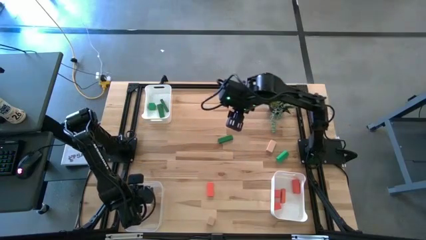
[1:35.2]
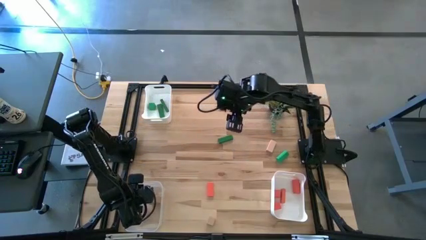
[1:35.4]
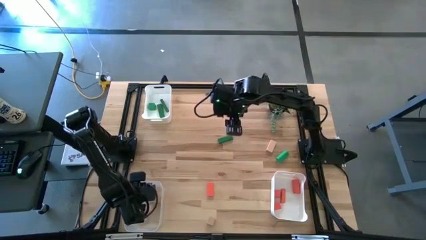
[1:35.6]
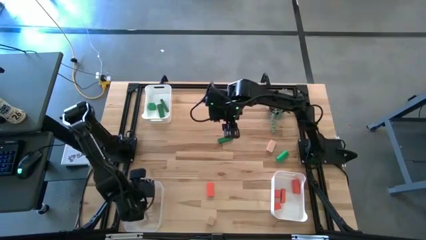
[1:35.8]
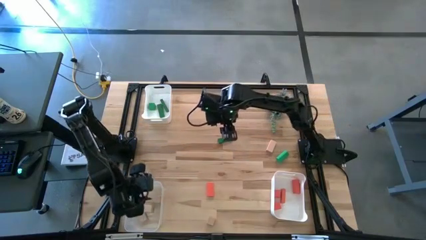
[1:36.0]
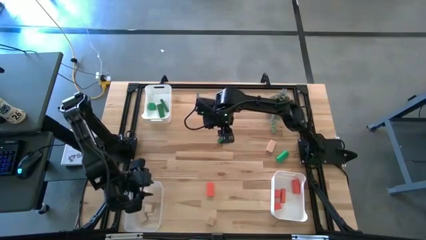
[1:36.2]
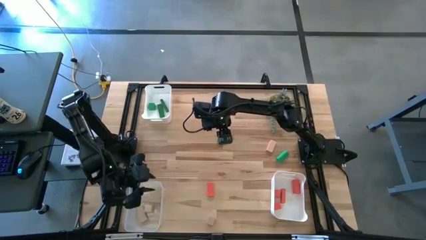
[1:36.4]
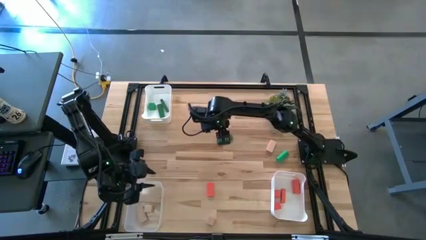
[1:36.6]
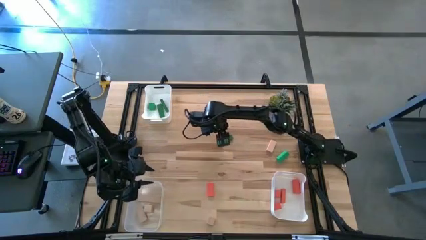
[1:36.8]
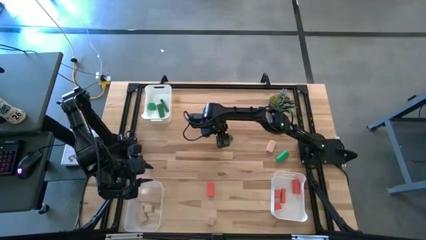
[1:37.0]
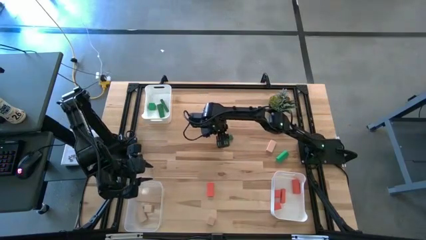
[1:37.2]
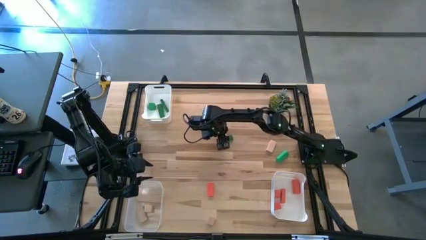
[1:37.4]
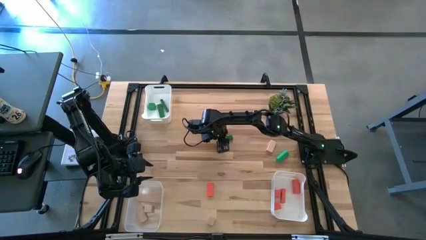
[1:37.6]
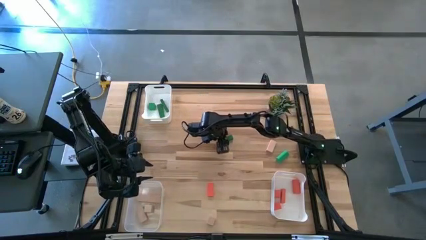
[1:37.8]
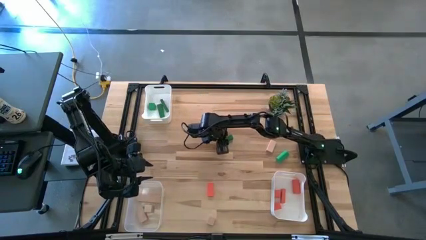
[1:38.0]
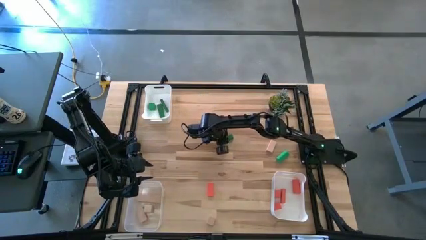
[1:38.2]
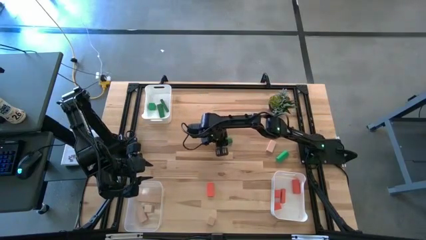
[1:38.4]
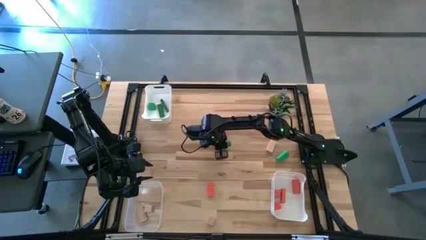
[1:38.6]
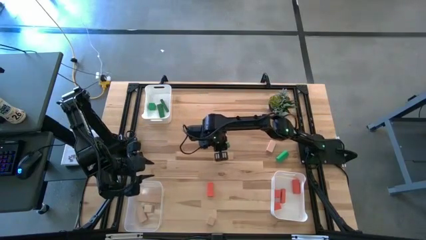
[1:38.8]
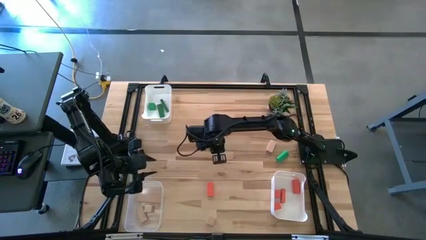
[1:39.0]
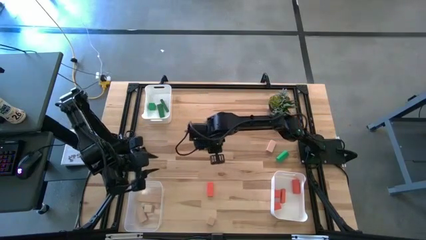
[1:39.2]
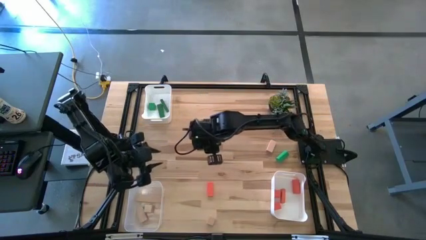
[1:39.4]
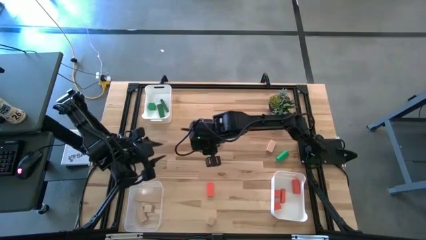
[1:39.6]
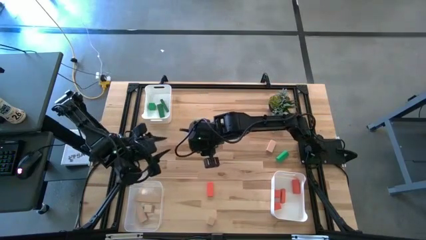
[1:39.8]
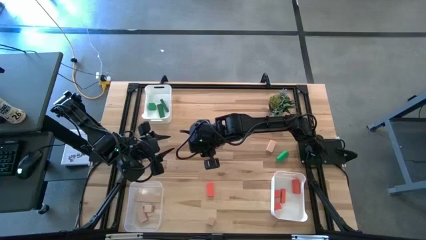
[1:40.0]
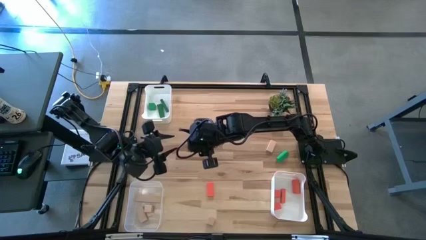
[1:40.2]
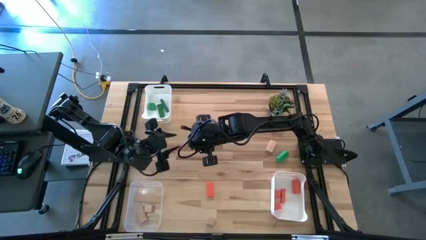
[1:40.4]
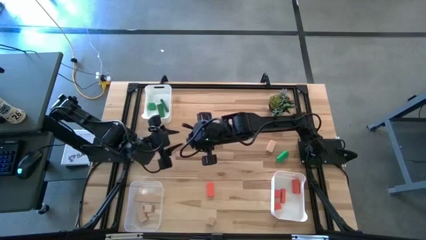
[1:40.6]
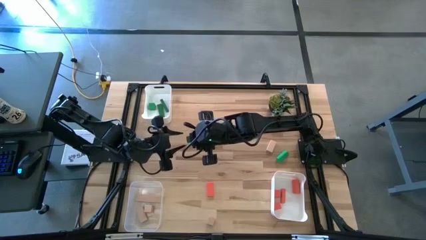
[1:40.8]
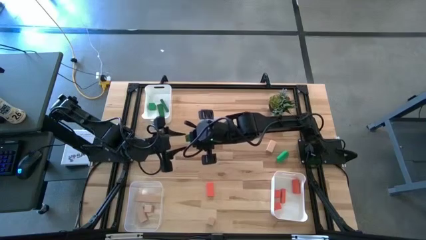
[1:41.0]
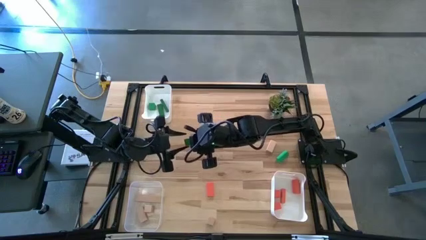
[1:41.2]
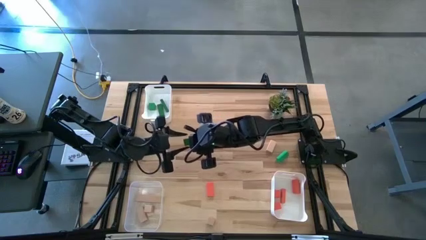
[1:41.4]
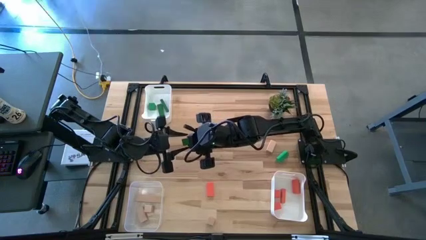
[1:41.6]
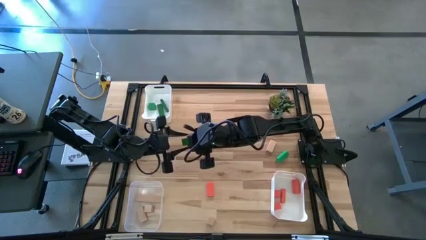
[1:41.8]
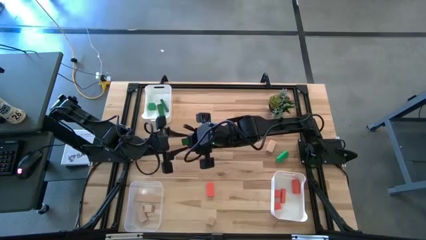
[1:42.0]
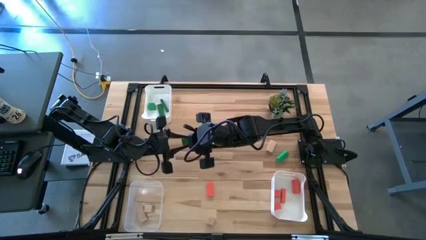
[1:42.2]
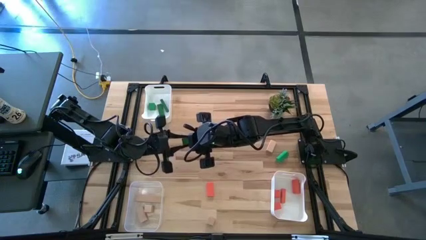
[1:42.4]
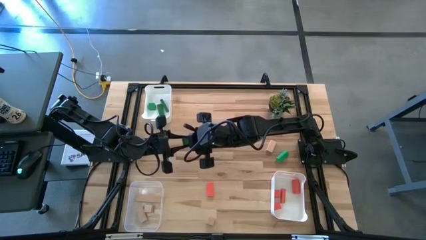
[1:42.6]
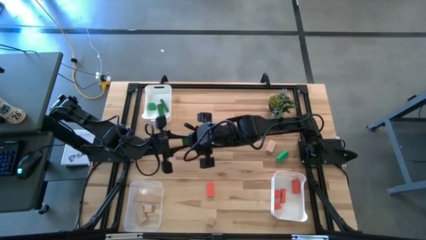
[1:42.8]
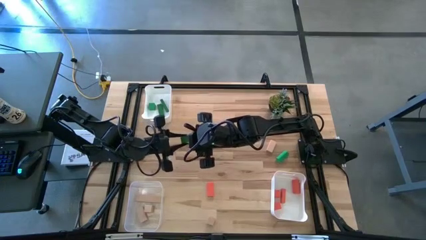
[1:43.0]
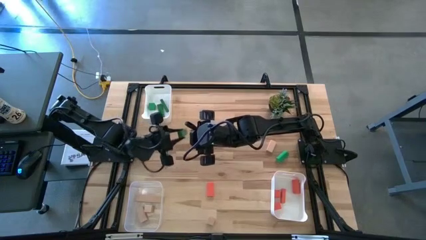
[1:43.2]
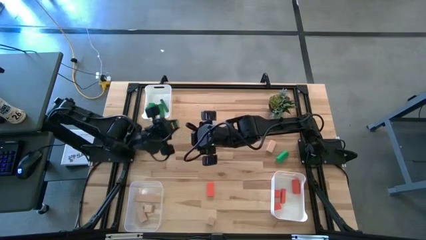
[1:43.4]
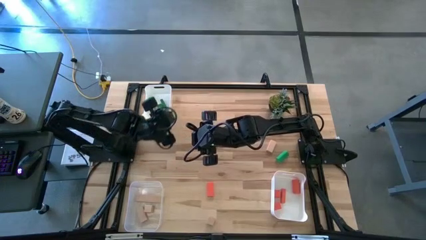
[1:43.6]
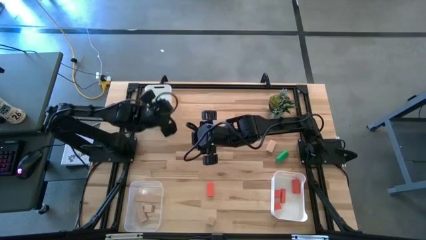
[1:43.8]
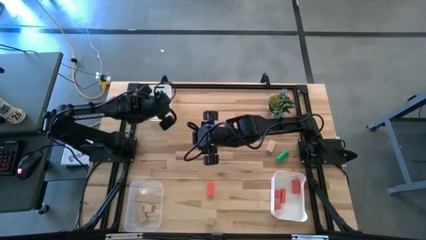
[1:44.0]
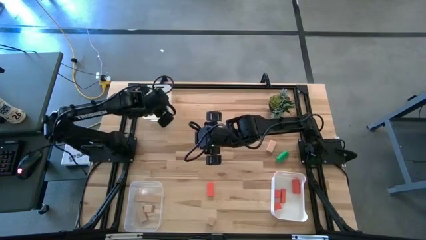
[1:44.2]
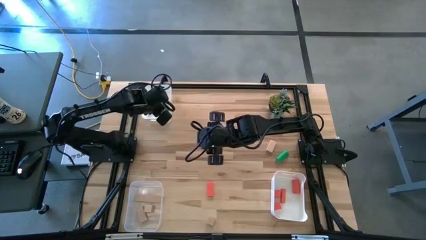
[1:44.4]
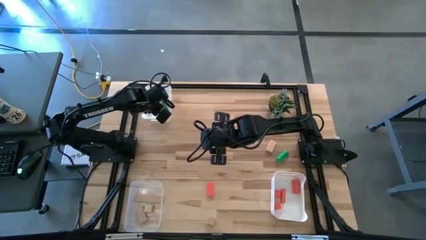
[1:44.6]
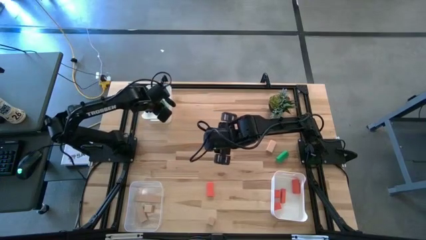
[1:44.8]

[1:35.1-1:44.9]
Task: Sort & place blocks by color
Put the green block into the top white bin

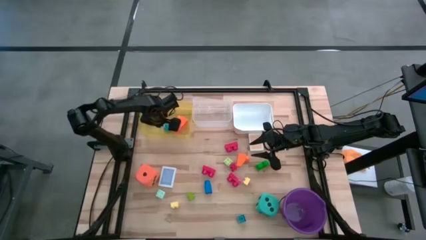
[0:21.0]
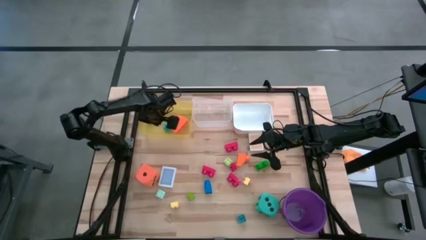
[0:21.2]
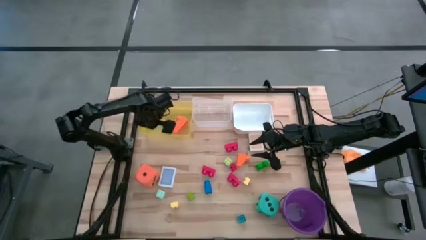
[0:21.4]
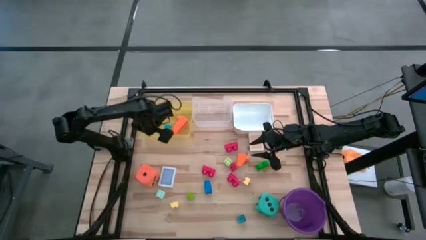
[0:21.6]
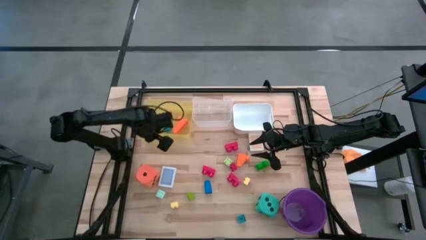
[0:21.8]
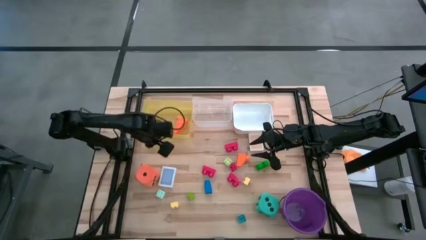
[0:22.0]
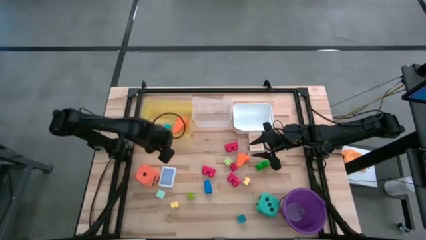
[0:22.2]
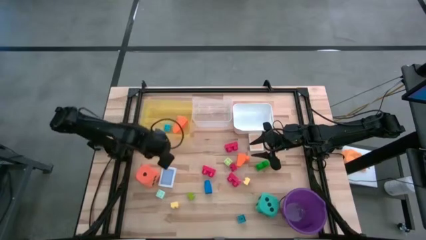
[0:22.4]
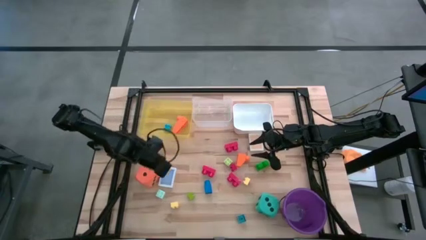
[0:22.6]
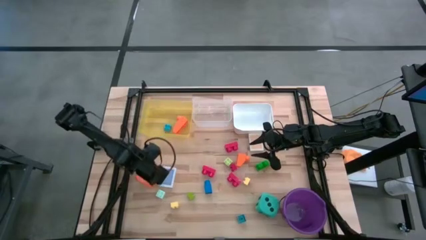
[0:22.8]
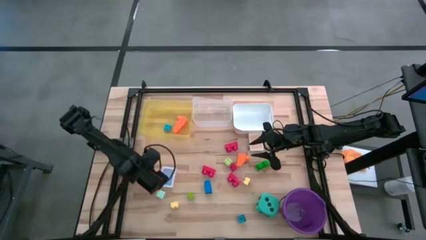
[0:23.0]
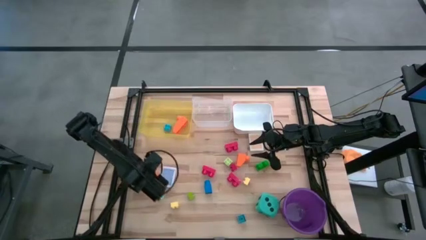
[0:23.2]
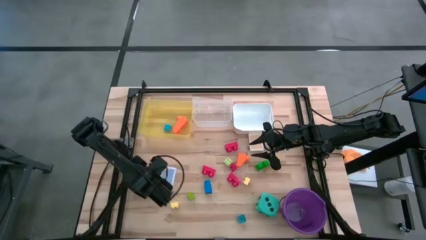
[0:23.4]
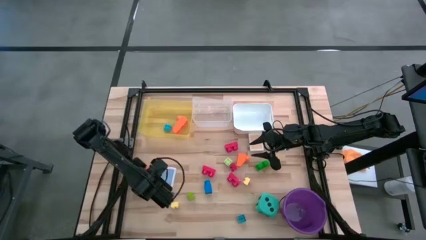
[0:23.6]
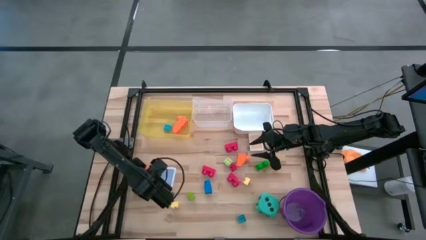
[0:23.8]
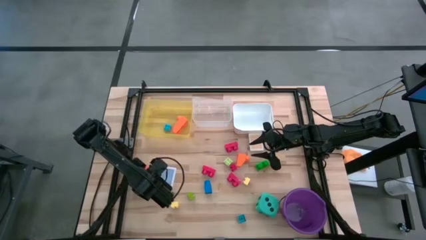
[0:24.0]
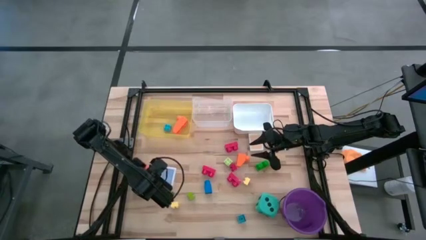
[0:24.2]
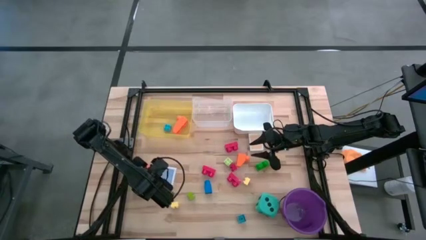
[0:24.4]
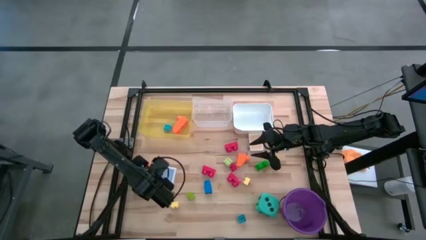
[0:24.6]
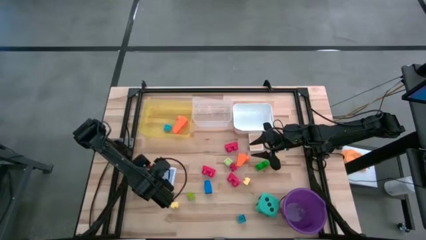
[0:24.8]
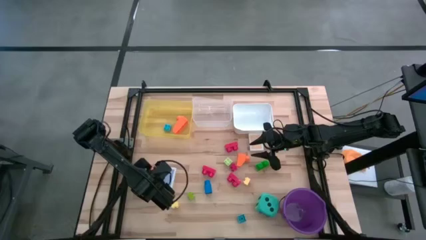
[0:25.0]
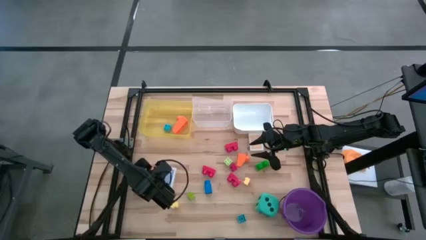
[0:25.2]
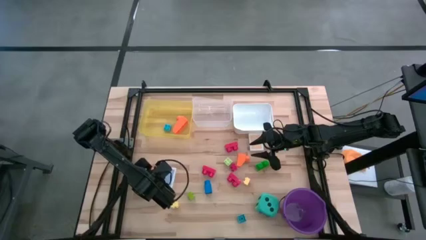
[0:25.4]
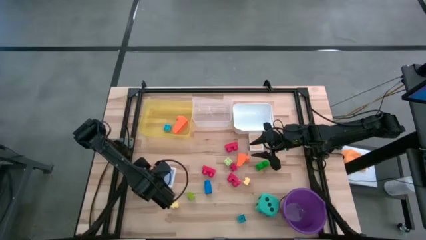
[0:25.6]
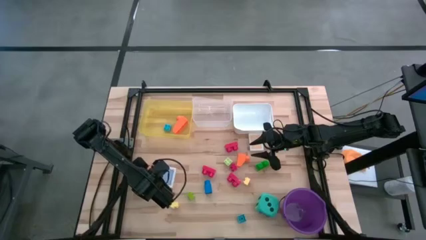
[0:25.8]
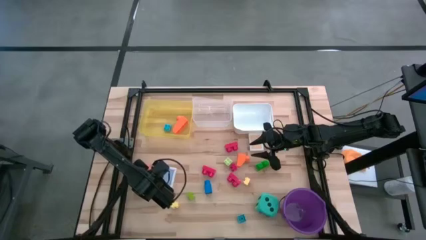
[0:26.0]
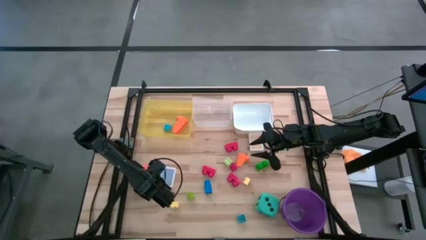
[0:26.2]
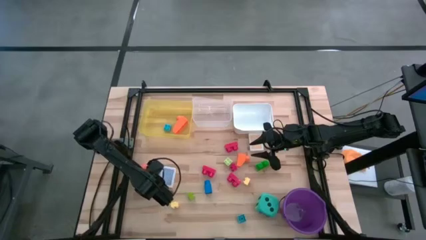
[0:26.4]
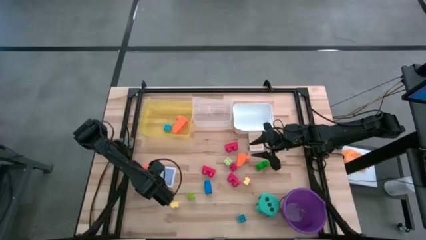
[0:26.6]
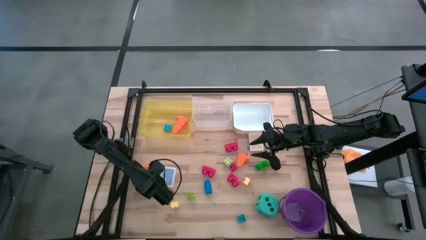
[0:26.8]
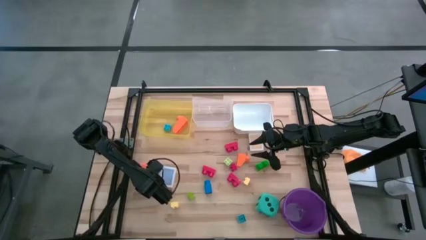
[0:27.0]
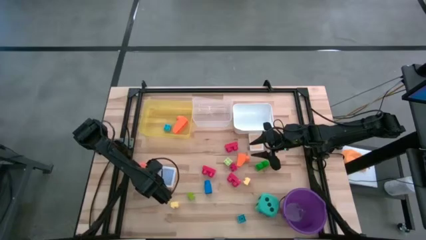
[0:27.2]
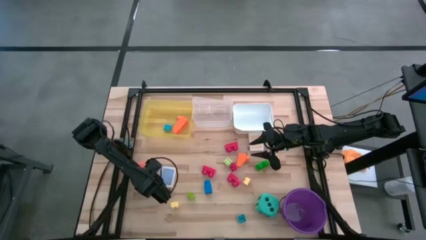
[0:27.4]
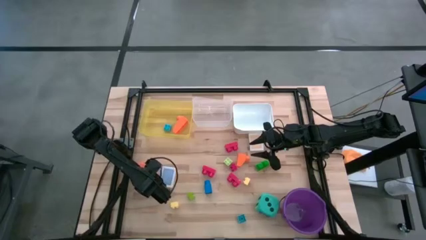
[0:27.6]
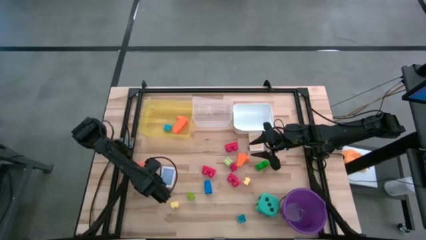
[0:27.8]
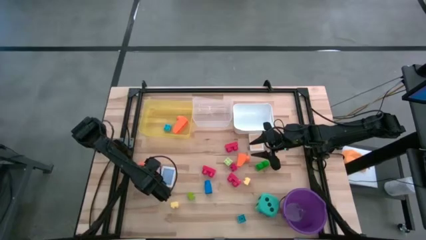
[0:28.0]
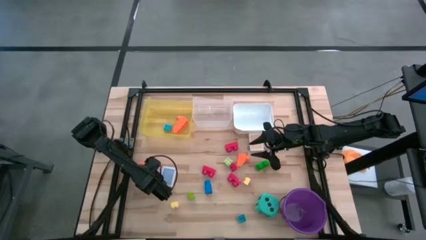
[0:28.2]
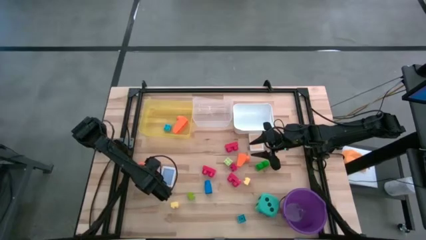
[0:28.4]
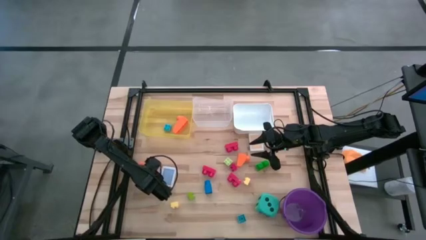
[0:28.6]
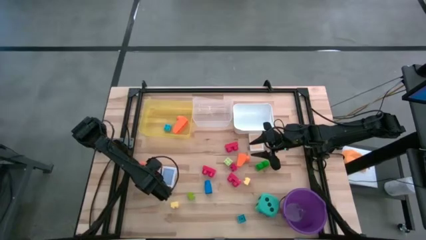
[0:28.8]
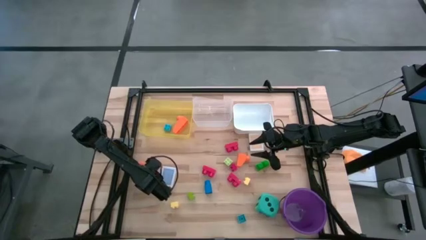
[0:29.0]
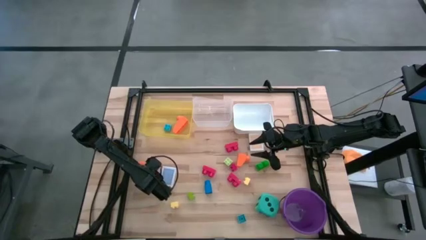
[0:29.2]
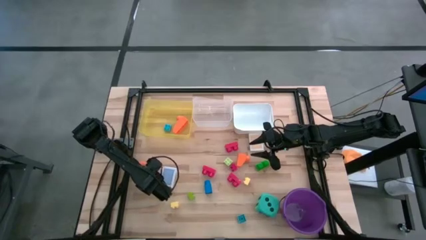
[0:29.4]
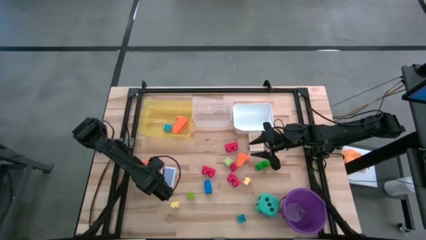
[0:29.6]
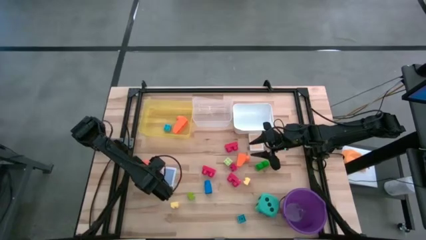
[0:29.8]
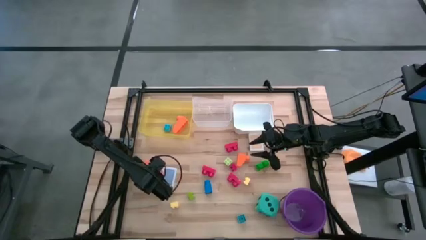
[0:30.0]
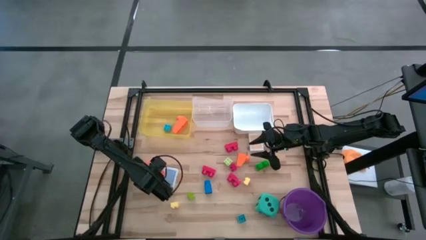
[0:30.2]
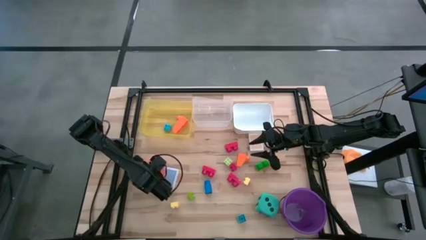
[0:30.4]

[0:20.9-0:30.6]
Task: Pick & Place Toys
Put the orange dice into the transparent bin
